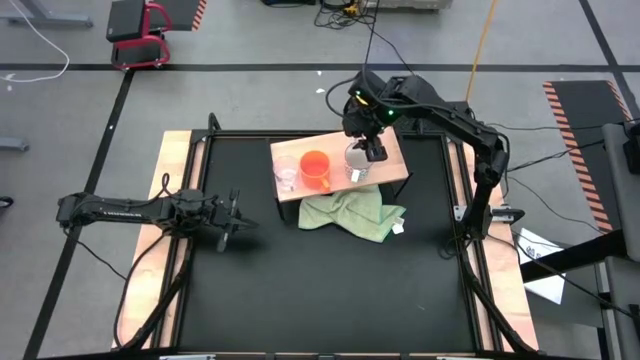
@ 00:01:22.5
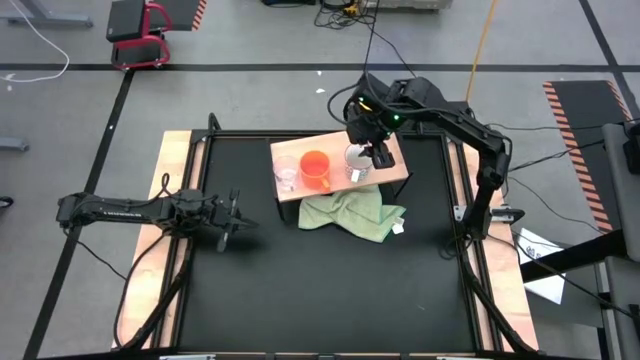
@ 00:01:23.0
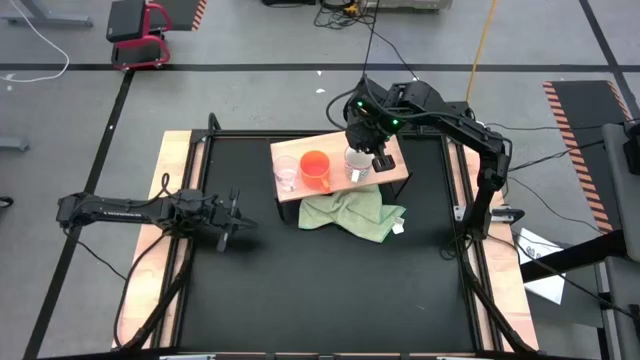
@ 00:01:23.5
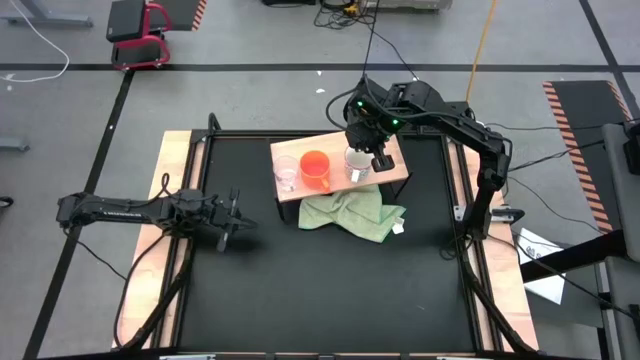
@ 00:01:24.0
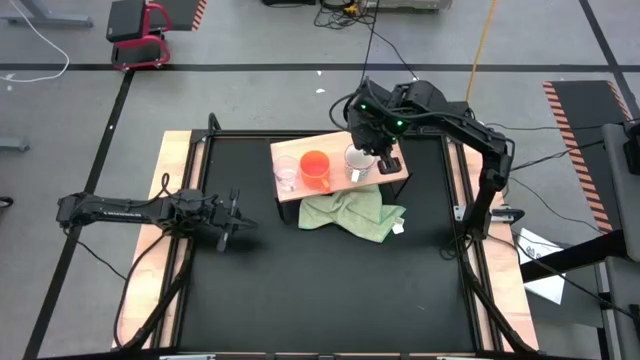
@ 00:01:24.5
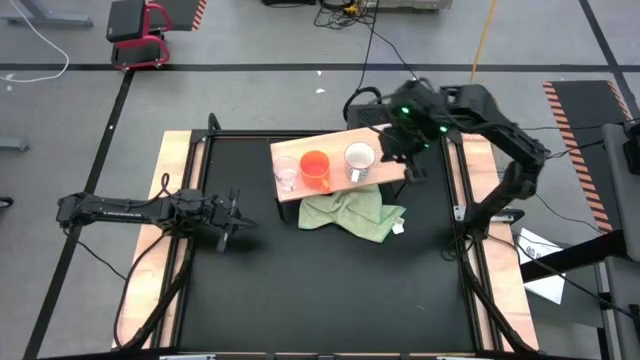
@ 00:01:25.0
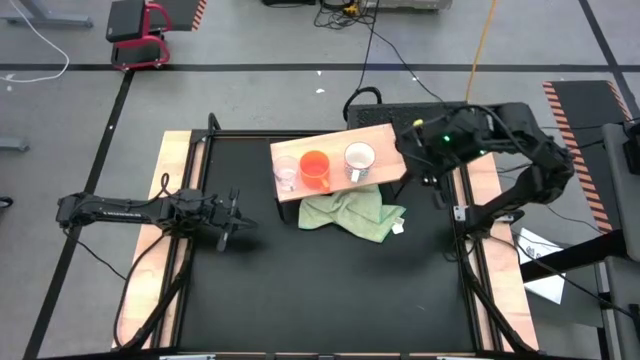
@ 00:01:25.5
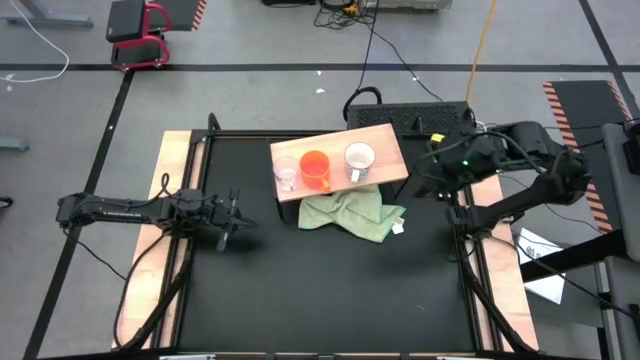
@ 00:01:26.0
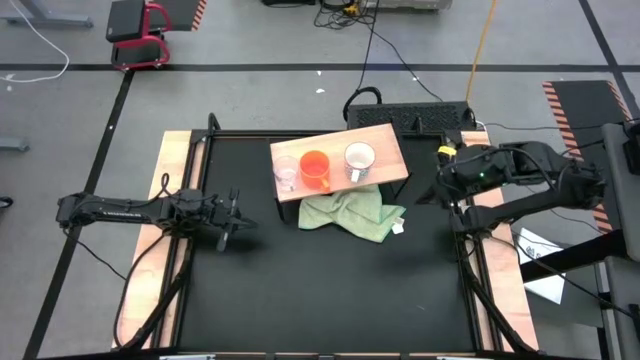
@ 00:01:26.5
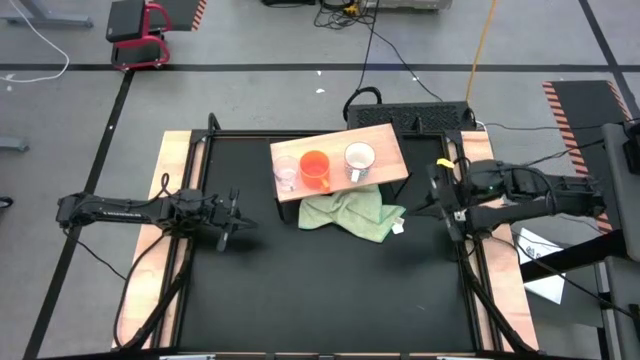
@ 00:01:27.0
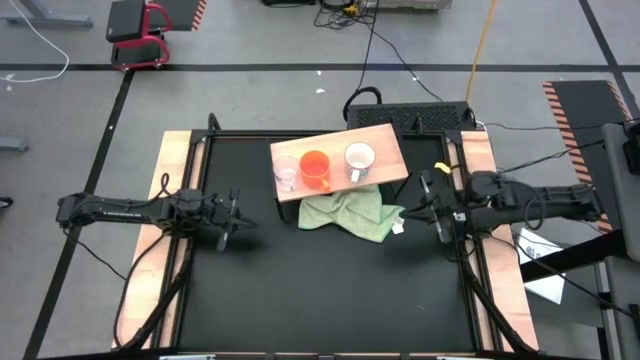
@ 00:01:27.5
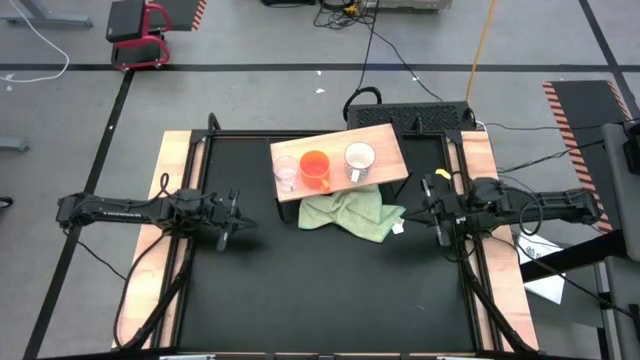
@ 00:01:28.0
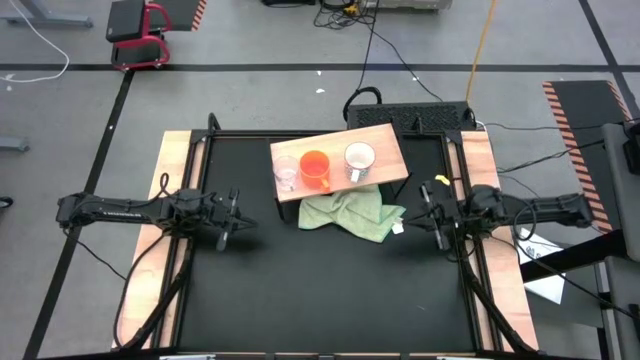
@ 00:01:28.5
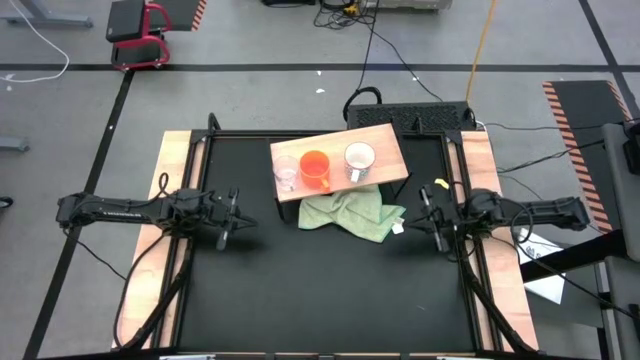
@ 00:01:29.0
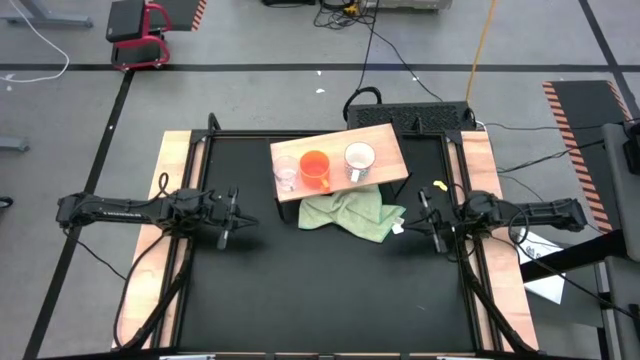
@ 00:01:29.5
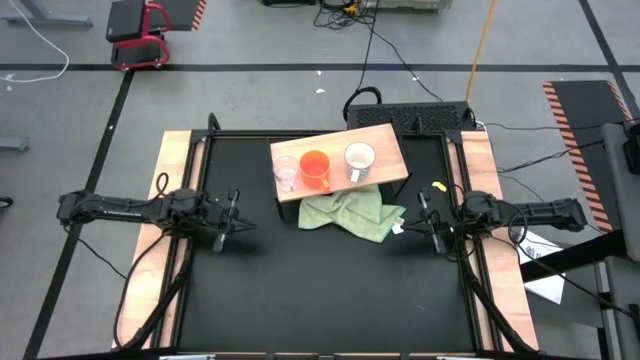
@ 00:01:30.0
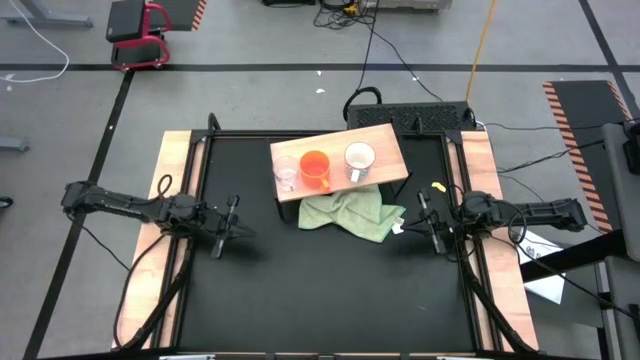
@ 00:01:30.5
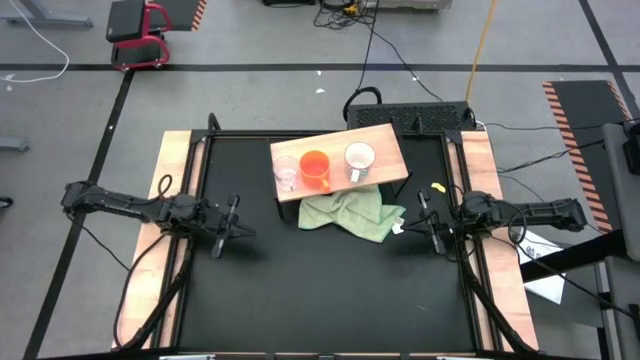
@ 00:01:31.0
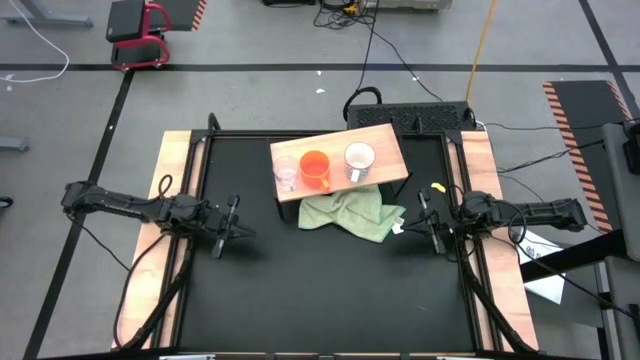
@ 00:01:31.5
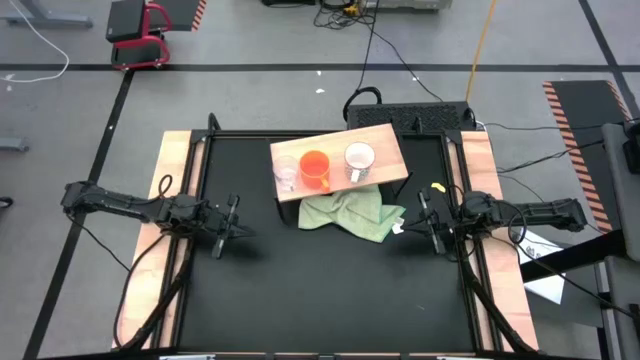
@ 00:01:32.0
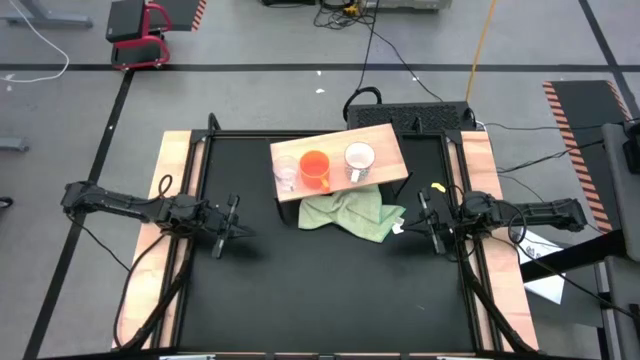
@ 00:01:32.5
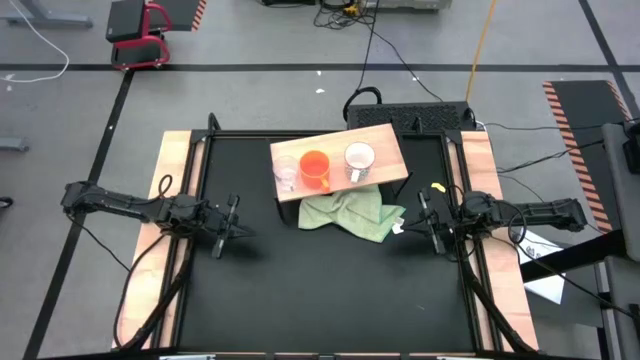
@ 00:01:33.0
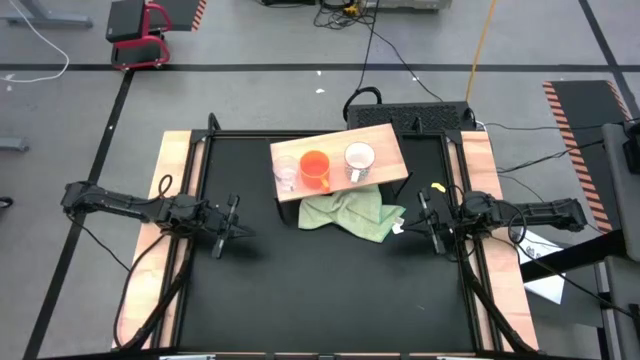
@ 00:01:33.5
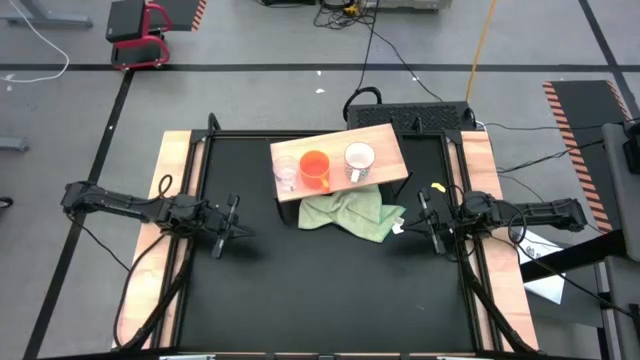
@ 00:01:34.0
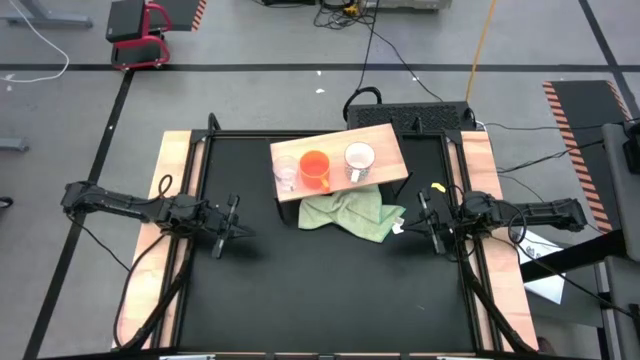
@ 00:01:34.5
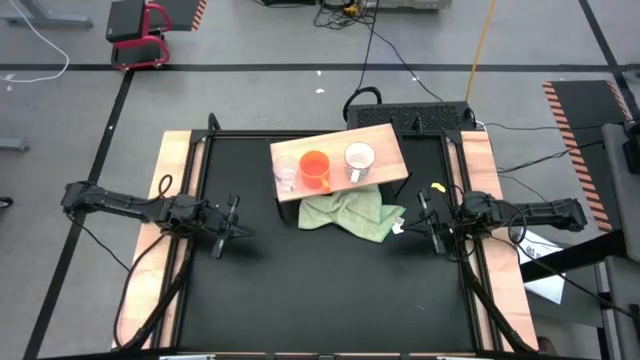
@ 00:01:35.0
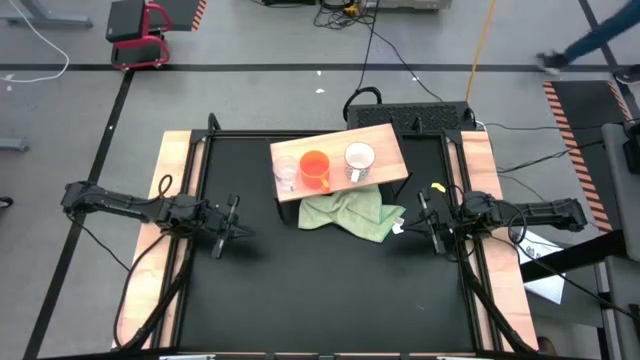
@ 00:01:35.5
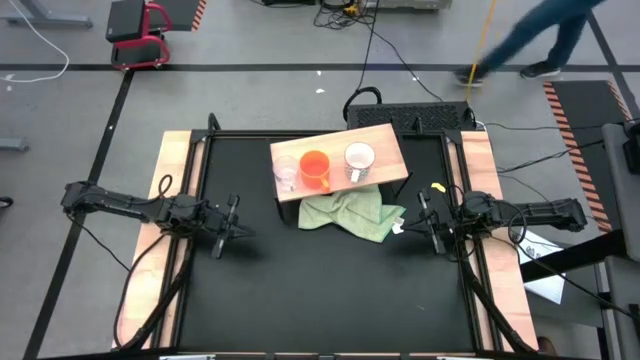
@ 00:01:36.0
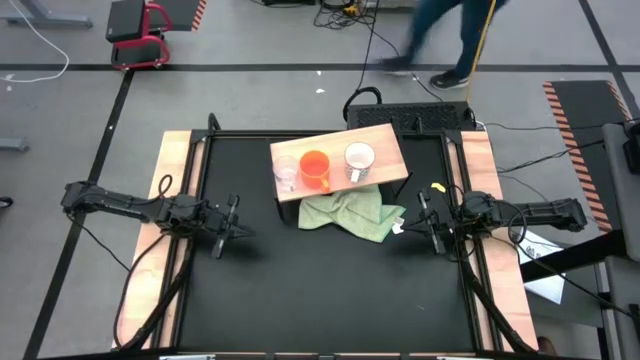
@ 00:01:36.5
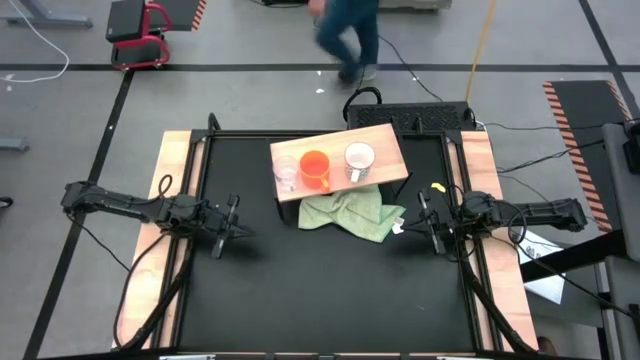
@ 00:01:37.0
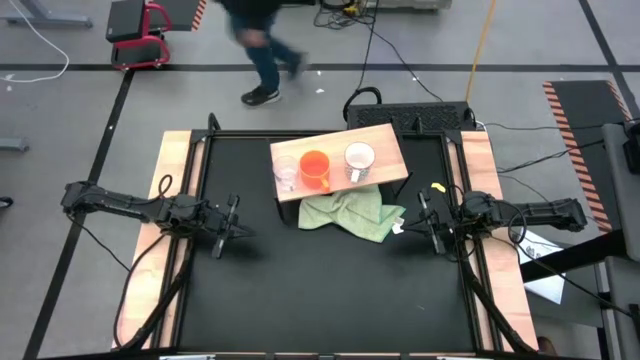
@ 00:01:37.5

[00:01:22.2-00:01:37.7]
Task: Stack small to large cups/mugs on shelf
Return to Home Position

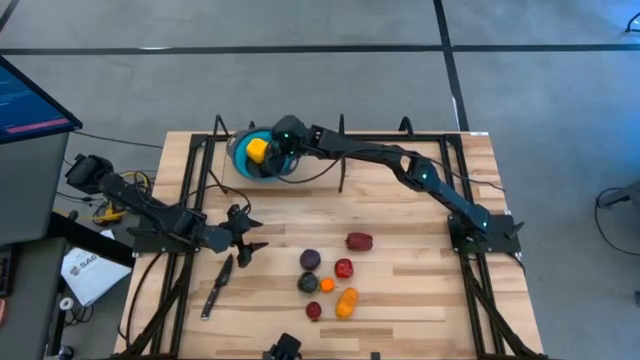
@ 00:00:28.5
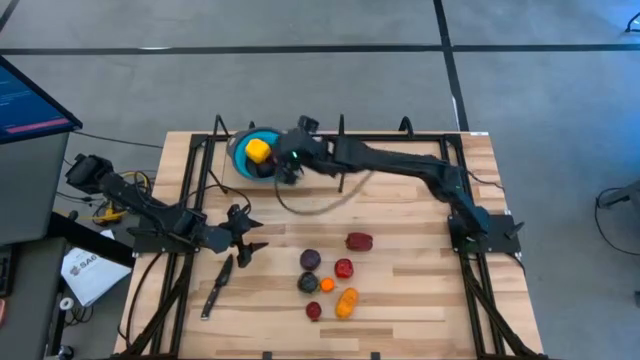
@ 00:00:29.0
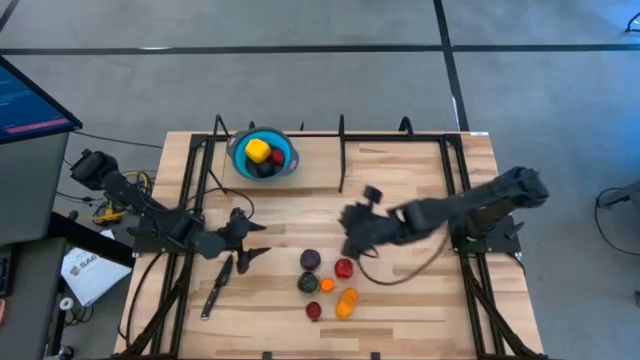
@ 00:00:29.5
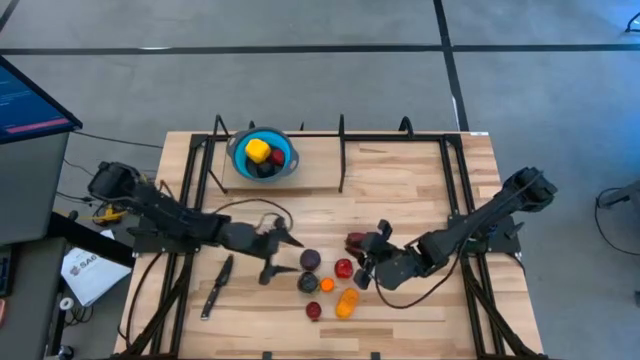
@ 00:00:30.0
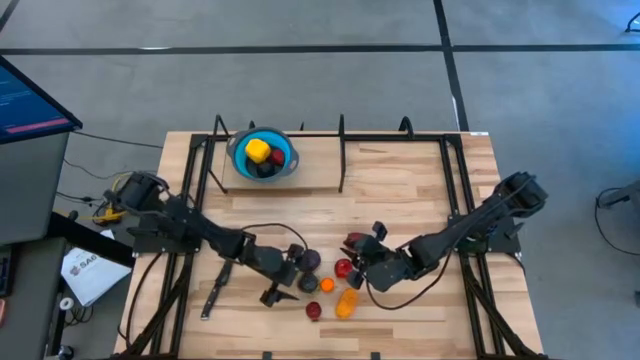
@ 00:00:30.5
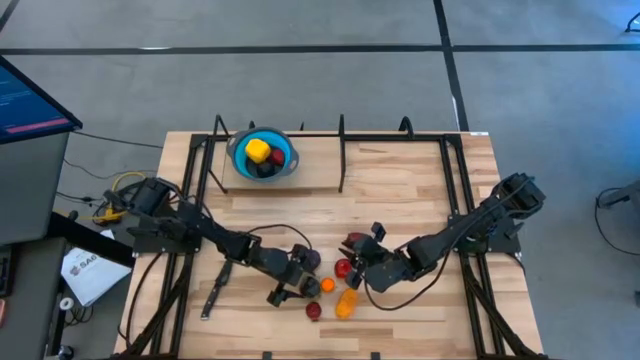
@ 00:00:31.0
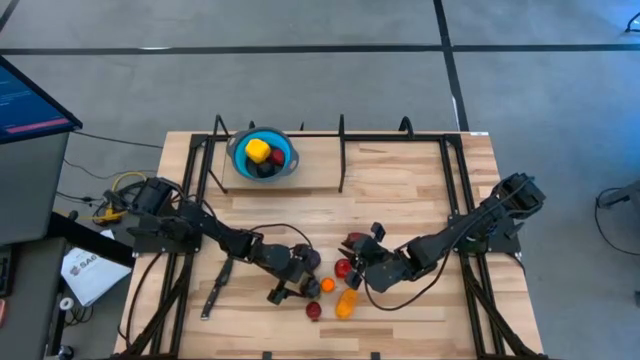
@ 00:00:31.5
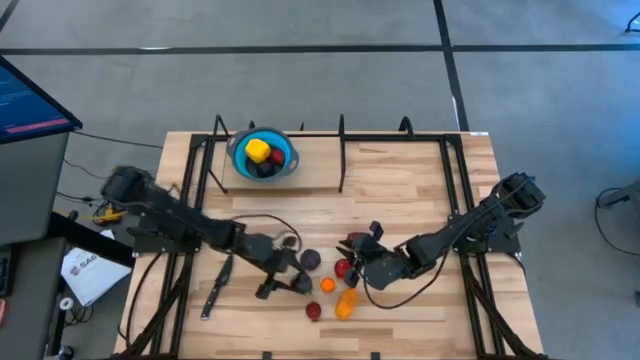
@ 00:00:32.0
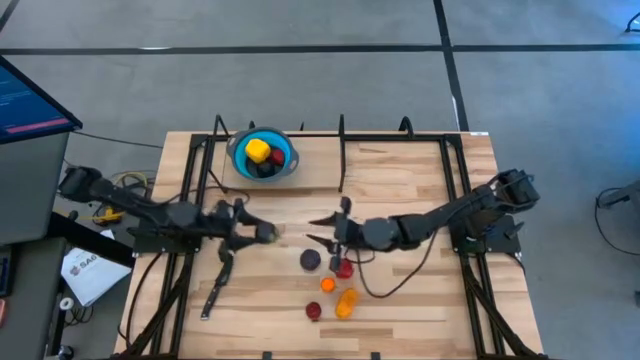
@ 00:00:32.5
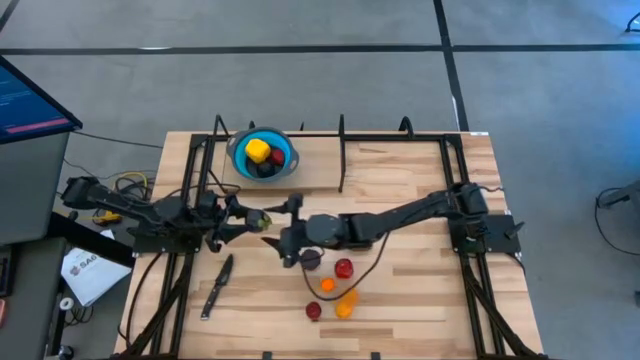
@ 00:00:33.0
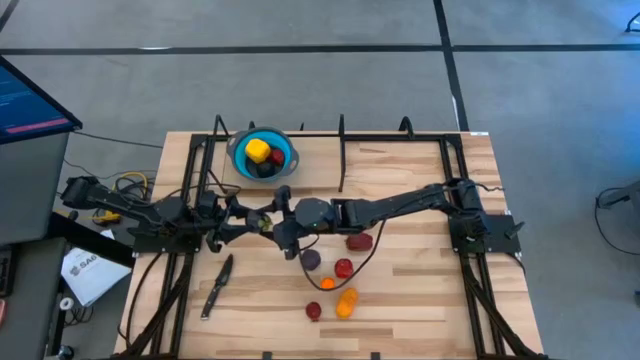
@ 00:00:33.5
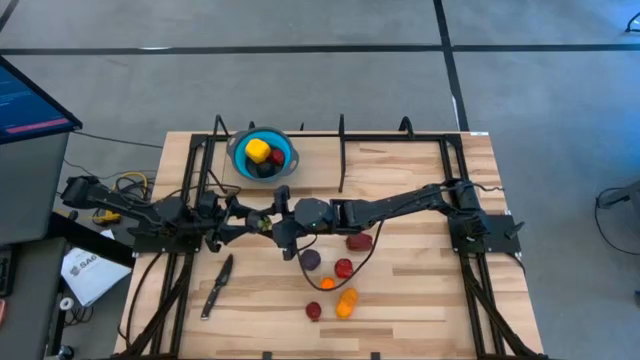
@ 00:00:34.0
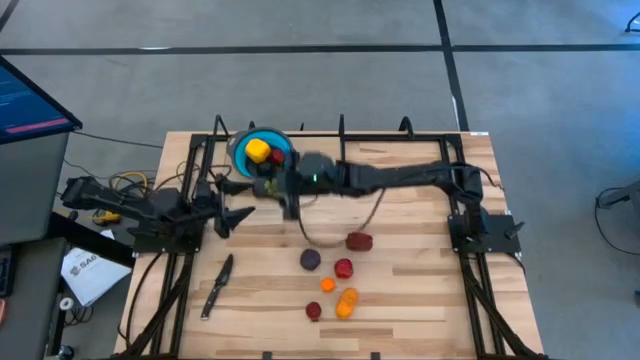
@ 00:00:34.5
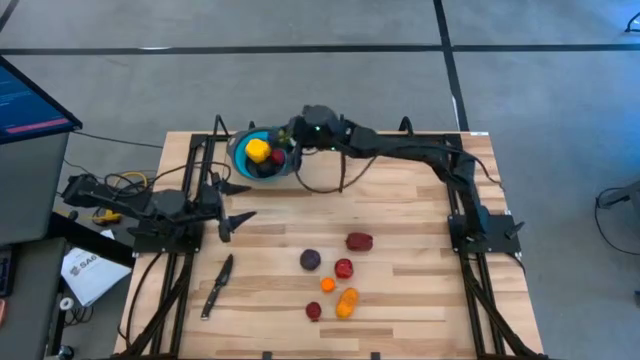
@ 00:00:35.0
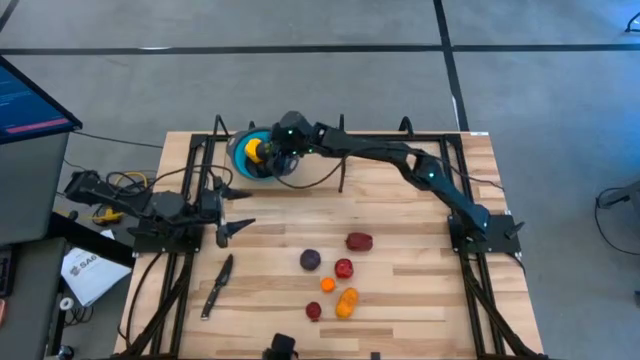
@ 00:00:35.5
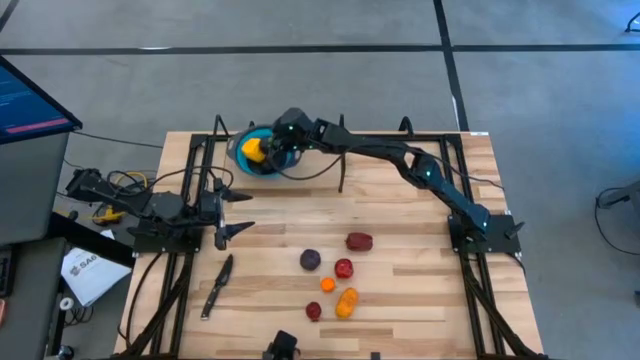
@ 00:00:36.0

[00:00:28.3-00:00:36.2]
Task: Pick & Place Fruit
Put the mangosteen in the blue strainer bowl on the shelf
